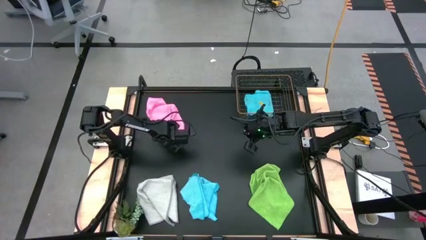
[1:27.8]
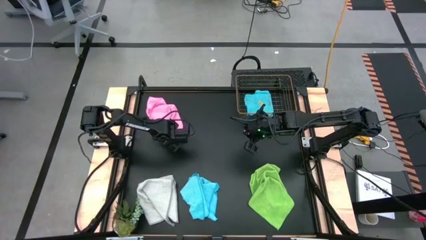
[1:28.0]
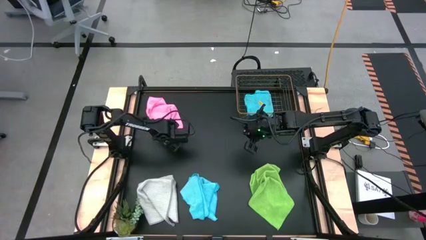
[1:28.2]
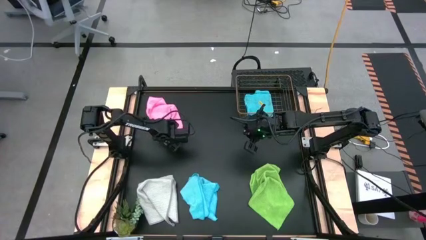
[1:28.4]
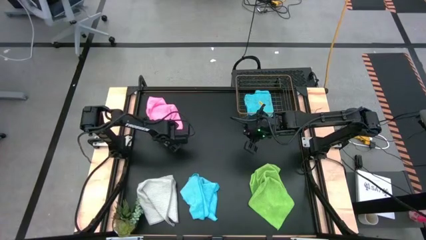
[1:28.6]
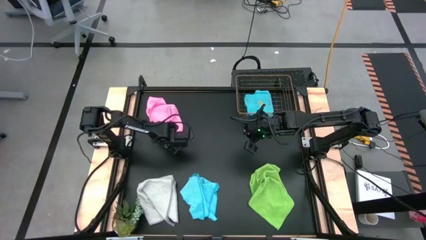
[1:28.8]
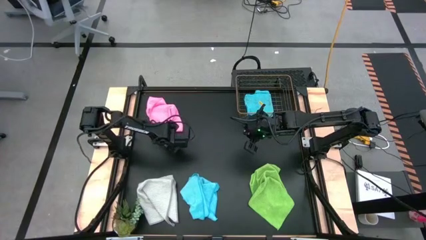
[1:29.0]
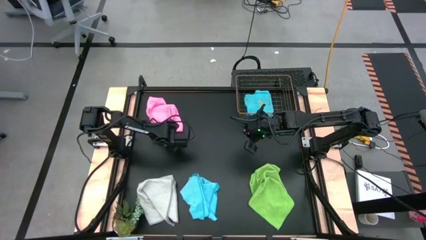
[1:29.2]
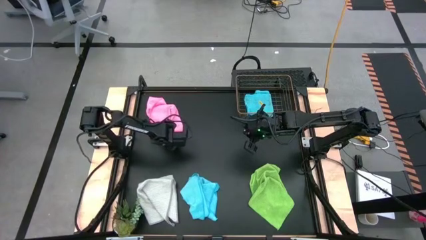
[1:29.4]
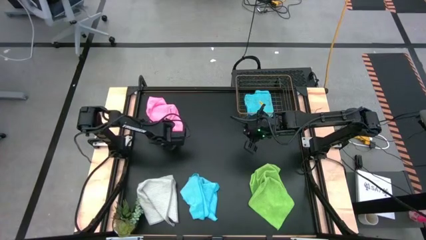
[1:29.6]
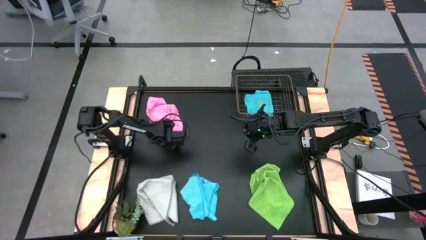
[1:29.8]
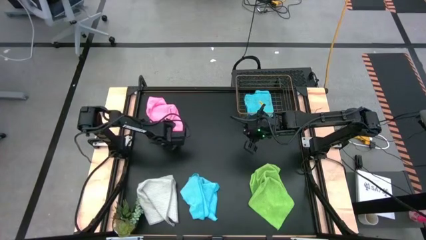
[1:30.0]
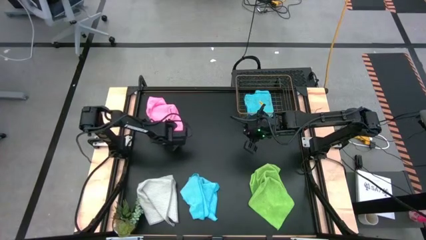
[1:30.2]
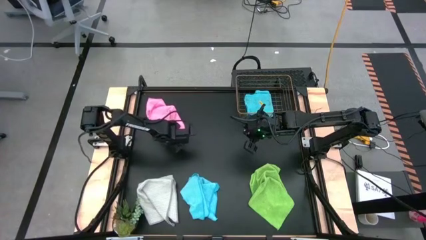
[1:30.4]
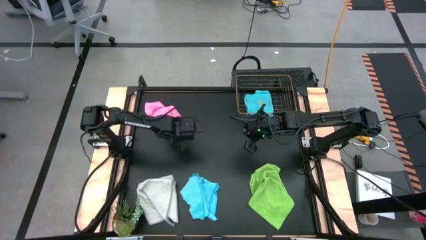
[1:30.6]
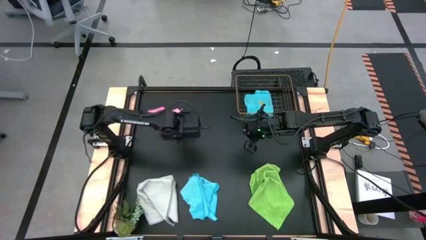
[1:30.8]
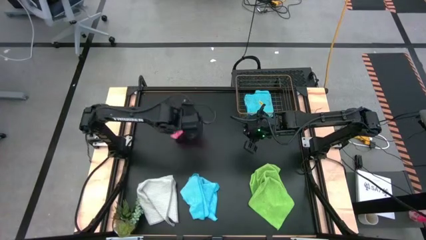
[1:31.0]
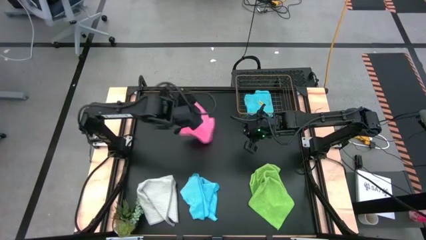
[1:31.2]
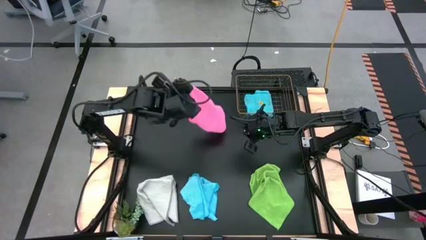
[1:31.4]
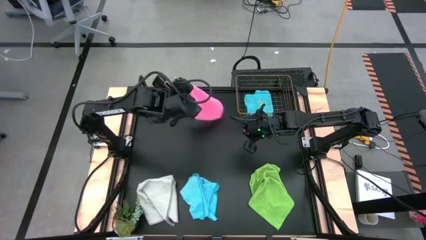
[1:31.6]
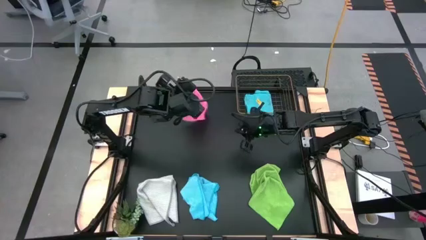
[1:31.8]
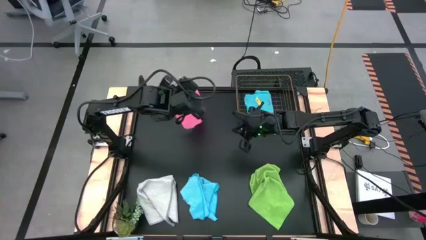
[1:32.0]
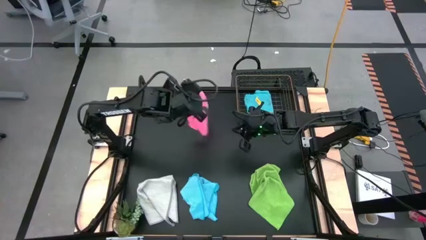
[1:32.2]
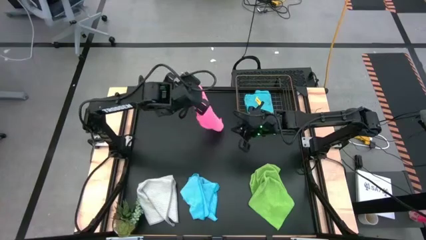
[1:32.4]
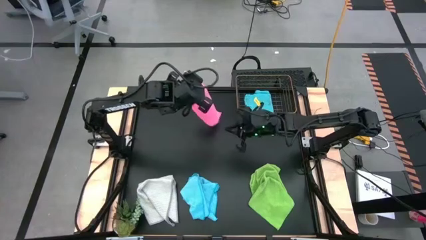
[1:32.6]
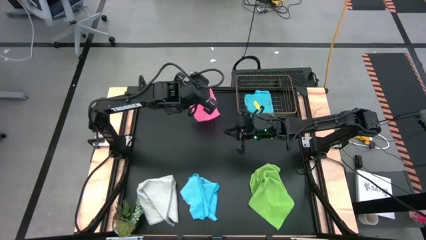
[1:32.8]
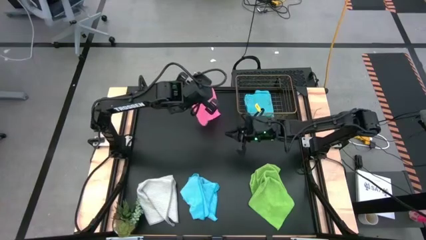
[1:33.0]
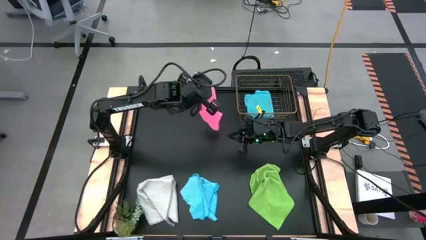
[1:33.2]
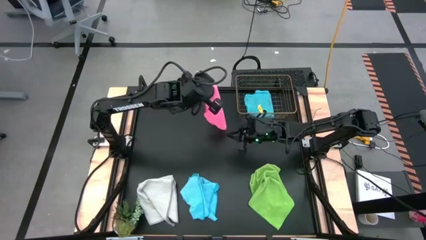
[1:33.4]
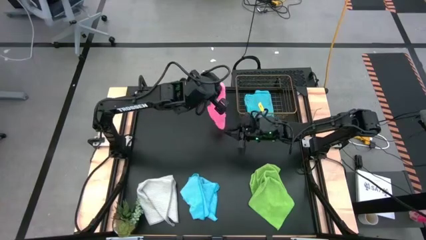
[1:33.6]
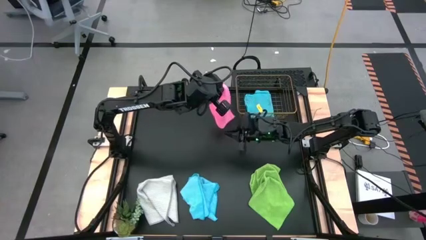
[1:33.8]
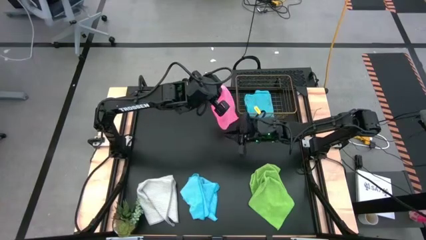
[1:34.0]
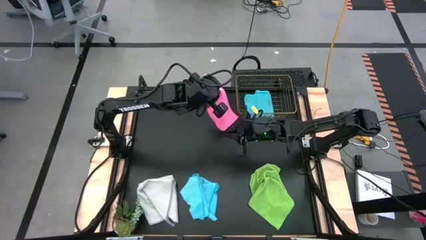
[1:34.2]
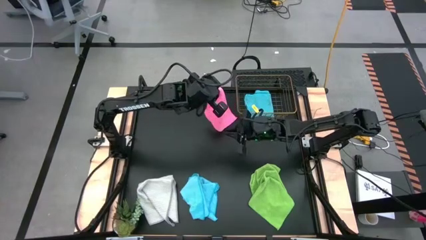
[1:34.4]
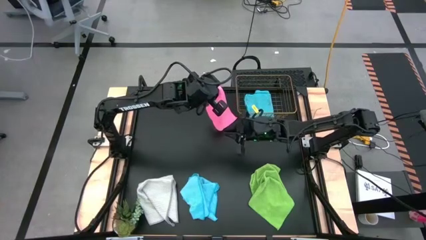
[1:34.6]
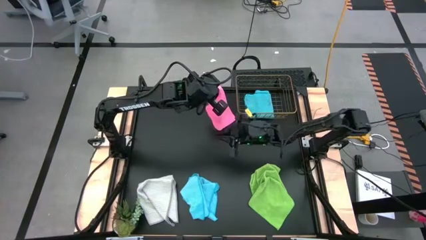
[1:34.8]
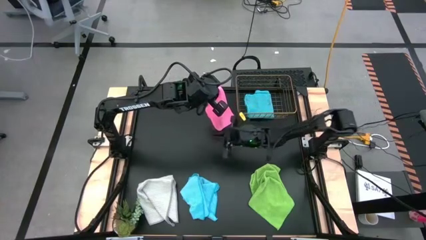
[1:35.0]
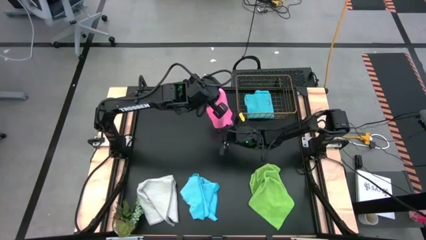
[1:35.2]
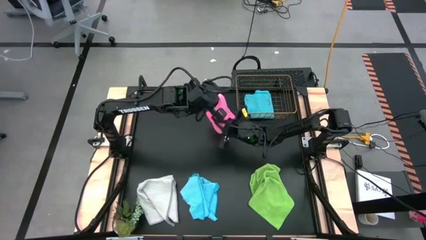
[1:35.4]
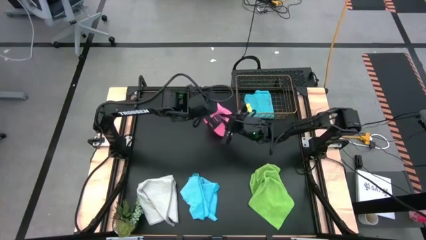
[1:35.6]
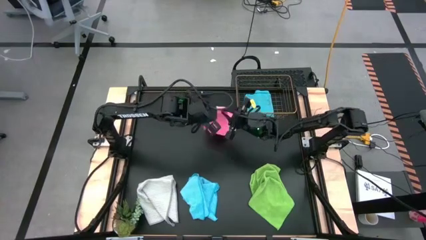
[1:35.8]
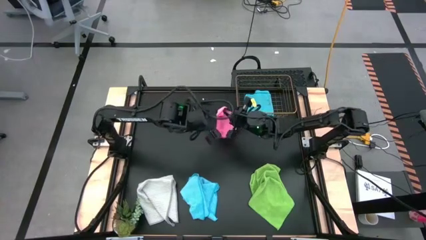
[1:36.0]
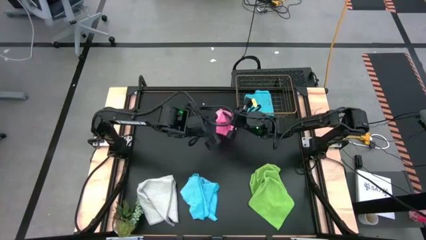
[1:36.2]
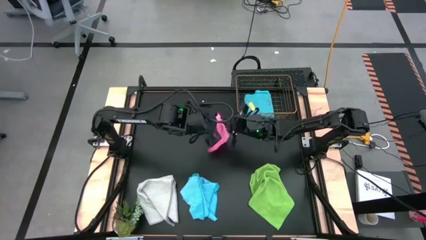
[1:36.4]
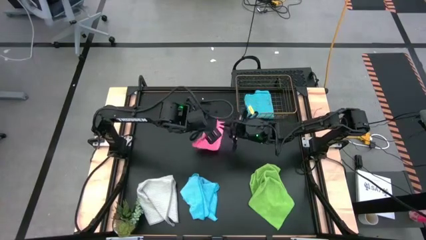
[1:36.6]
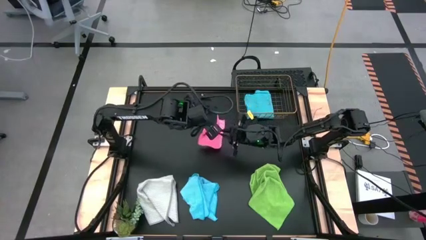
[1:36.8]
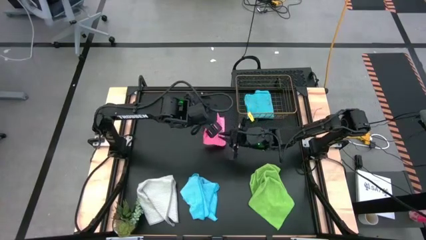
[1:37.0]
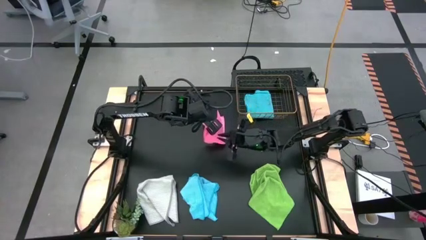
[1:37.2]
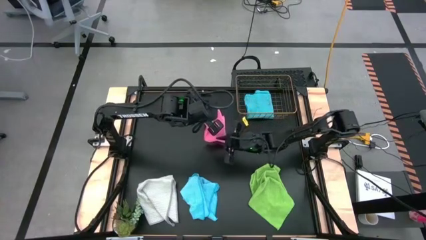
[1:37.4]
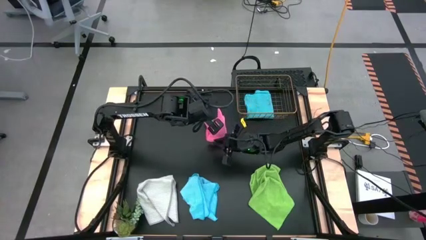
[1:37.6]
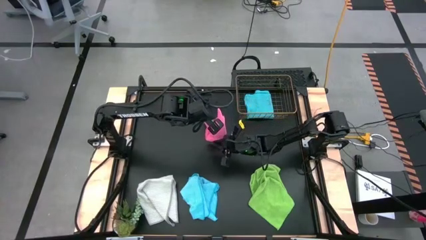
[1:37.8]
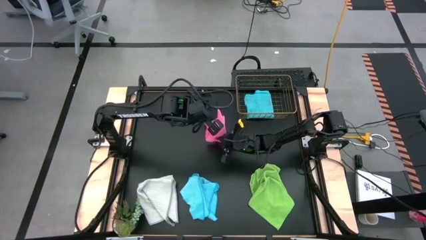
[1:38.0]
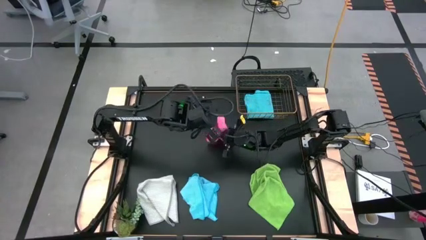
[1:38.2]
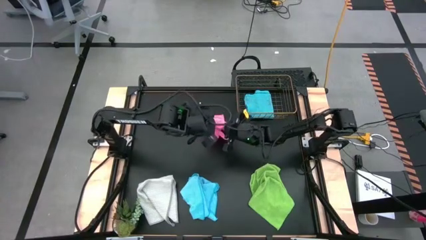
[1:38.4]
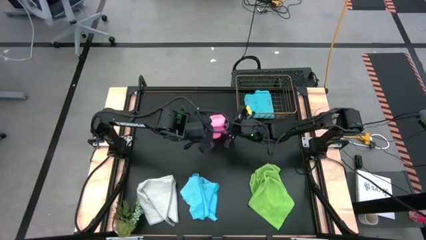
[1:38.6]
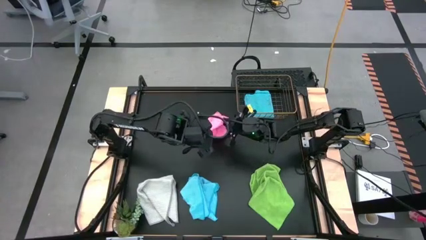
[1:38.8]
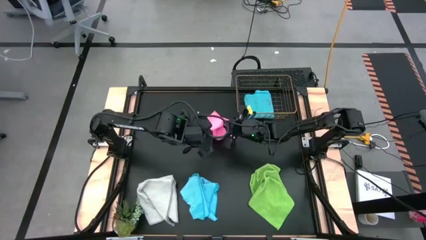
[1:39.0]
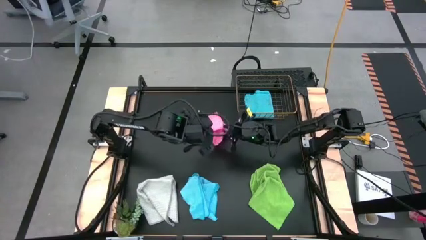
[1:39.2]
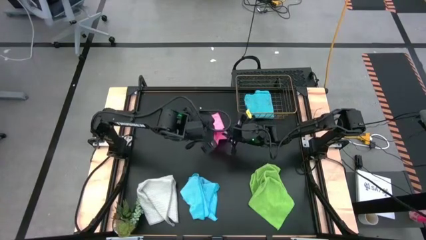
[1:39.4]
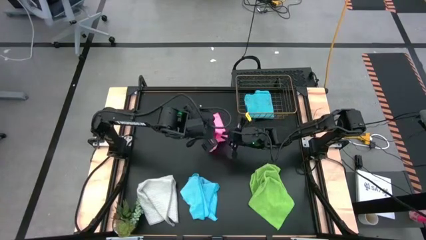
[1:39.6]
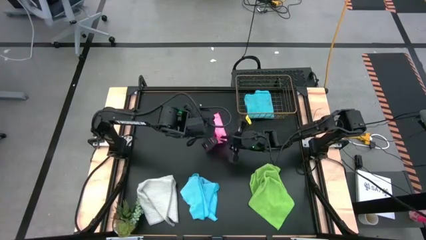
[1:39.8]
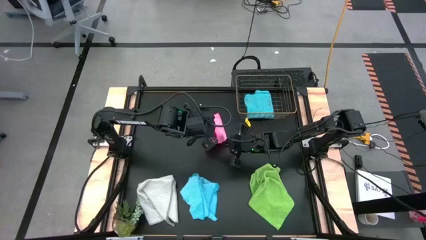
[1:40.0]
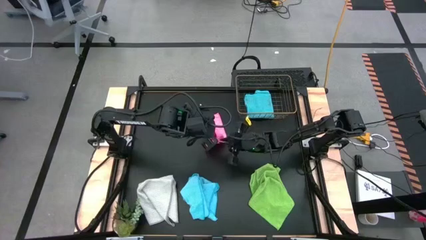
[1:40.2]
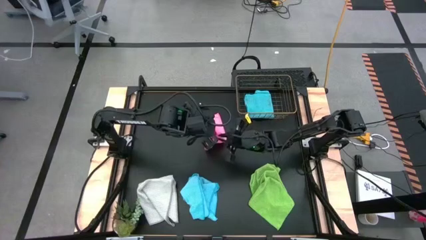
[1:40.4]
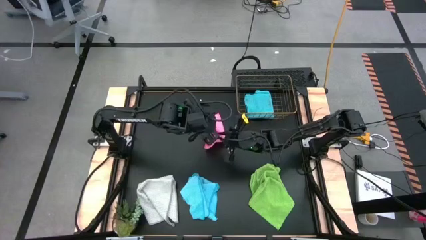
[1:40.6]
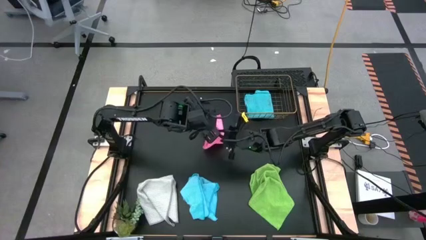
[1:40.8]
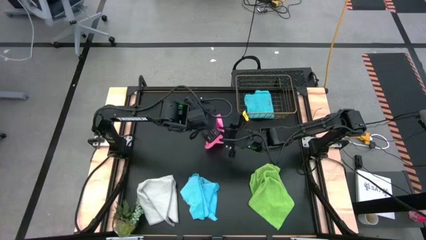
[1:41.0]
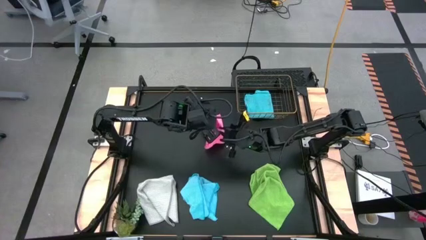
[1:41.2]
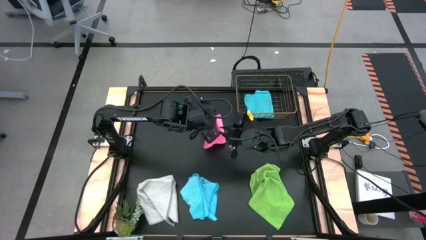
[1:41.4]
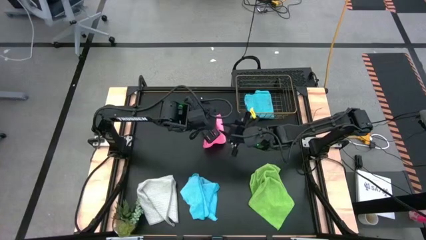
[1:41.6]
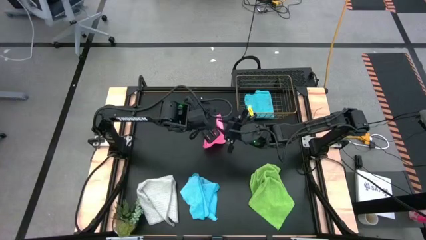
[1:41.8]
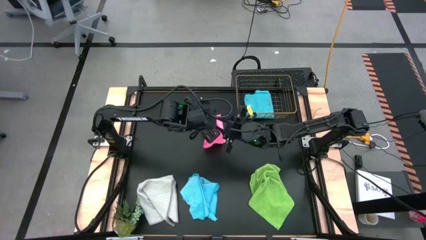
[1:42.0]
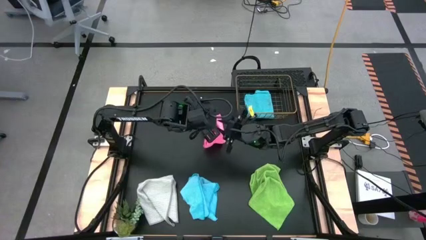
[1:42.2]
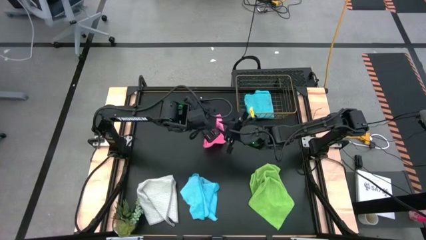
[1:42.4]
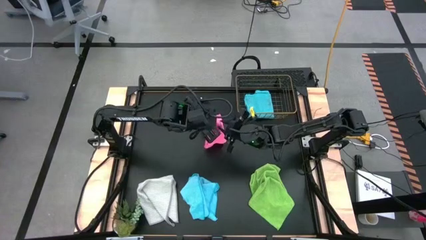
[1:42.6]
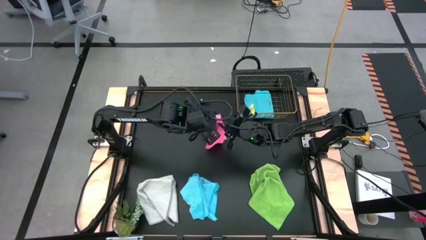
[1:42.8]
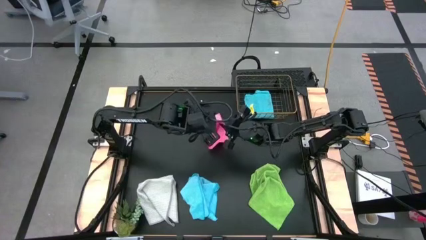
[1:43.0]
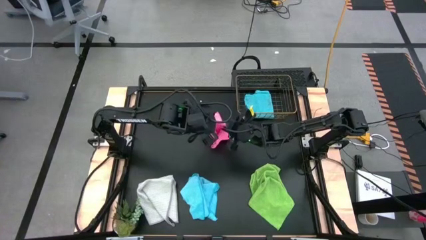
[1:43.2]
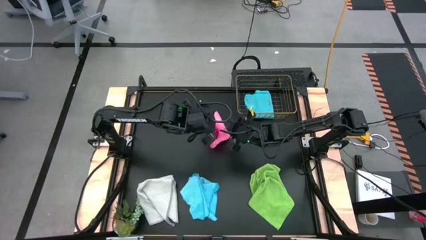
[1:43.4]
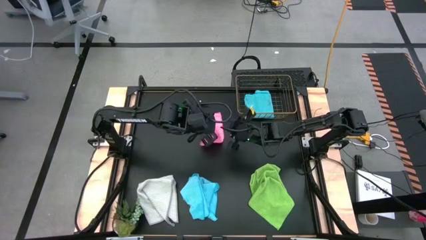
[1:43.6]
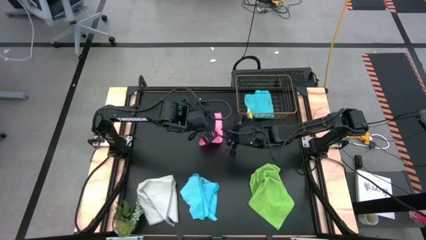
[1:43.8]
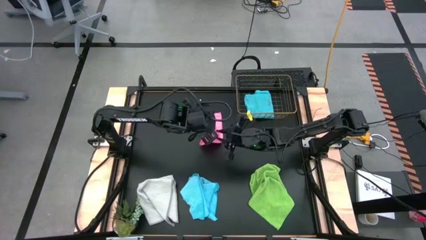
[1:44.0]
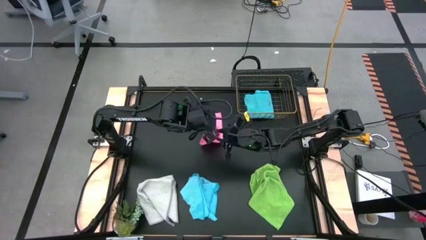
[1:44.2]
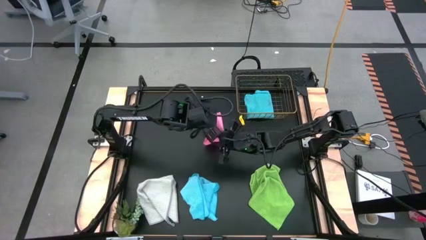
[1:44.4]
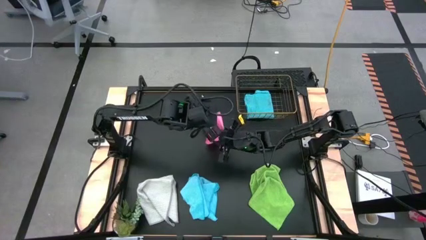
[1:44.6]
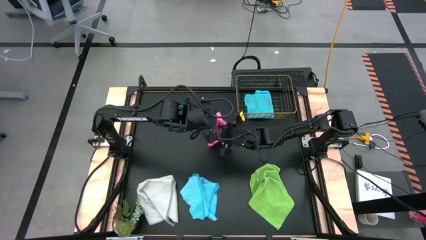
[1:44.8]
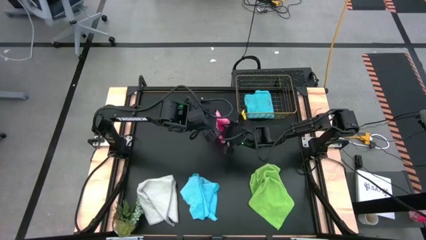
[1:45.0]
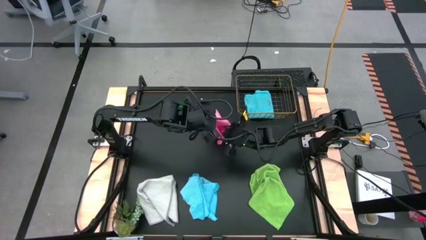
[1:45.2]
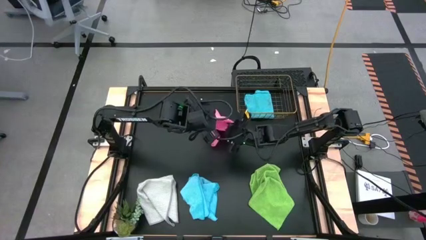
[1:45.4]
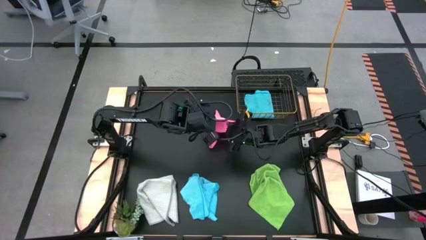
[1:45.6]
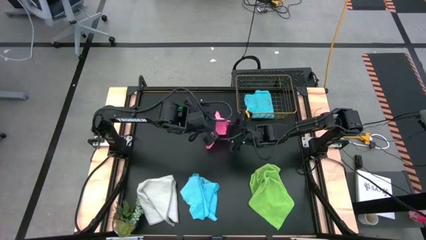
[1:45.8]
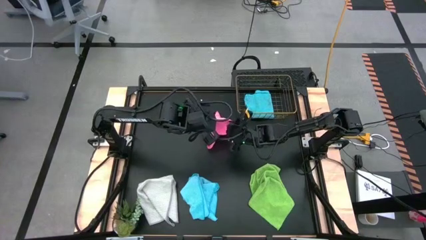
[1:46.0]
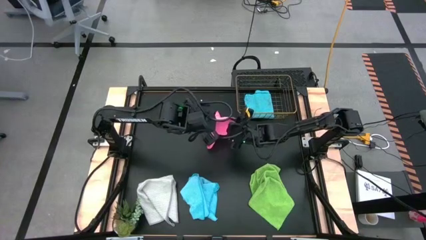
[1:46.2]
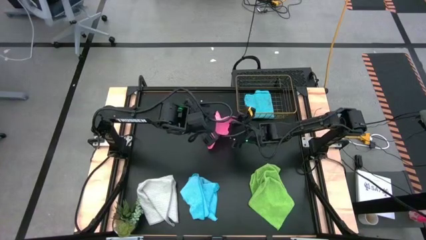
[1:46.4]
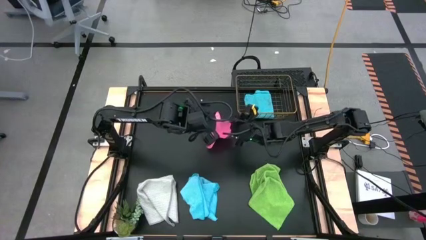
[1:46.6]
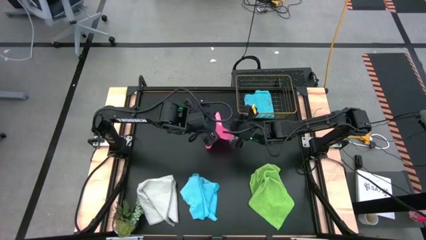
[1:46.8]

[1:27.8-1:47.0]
Task: Fold microfiber towels
Fold the pink towel
